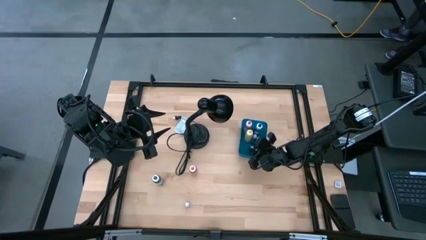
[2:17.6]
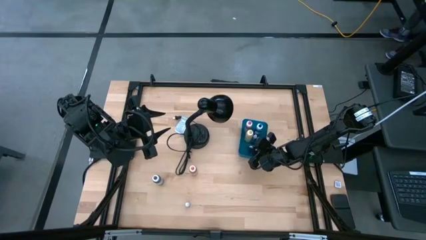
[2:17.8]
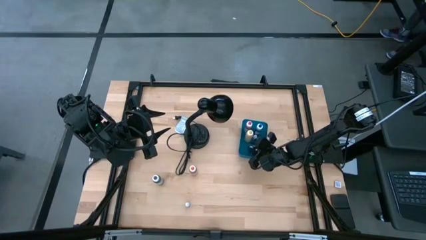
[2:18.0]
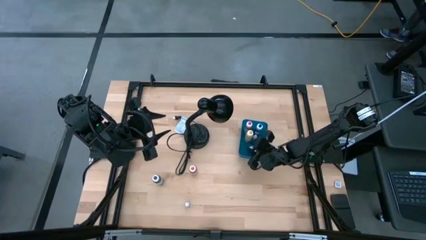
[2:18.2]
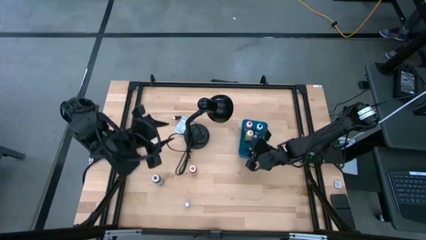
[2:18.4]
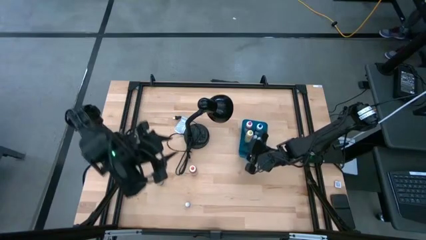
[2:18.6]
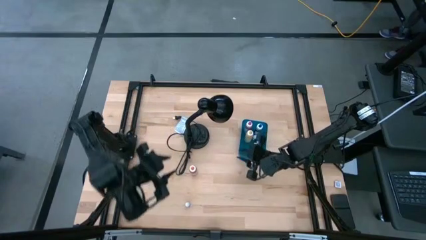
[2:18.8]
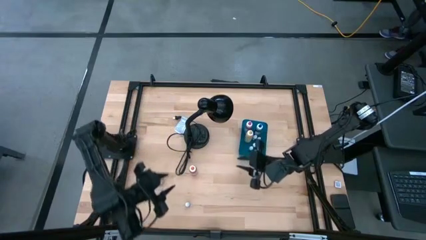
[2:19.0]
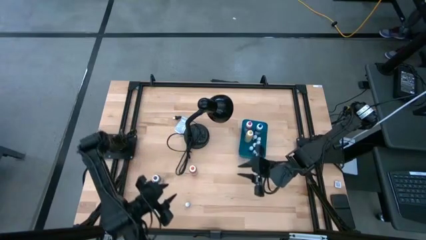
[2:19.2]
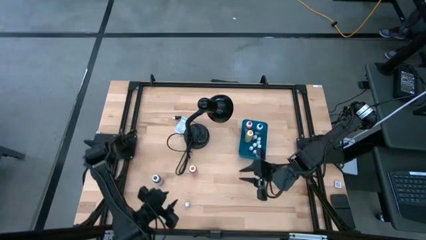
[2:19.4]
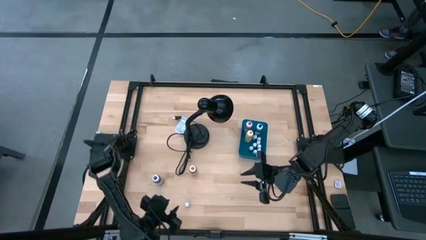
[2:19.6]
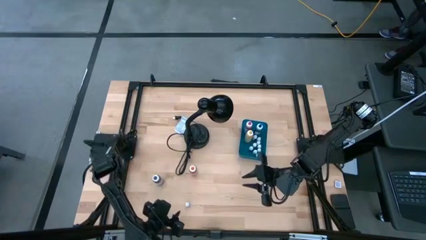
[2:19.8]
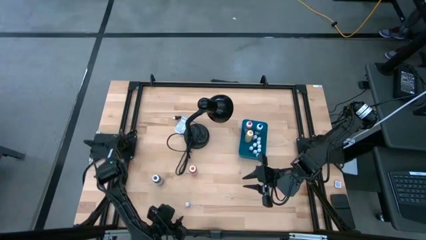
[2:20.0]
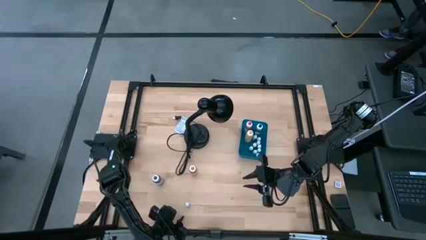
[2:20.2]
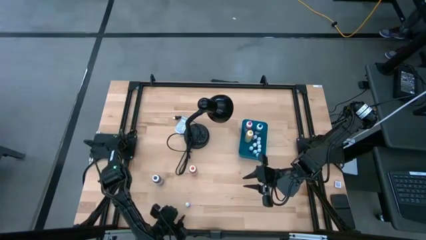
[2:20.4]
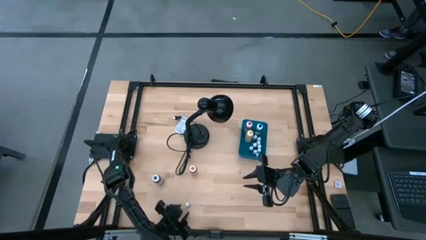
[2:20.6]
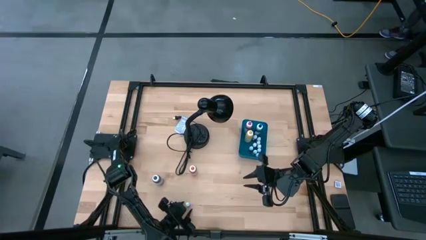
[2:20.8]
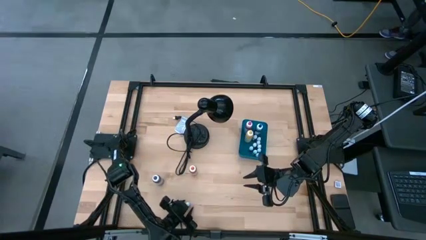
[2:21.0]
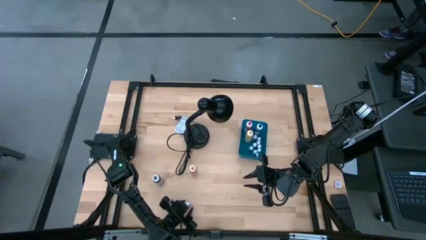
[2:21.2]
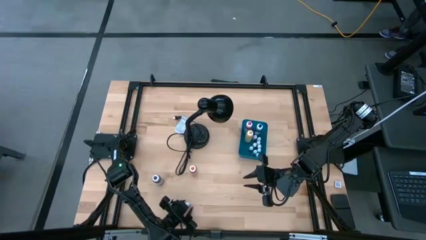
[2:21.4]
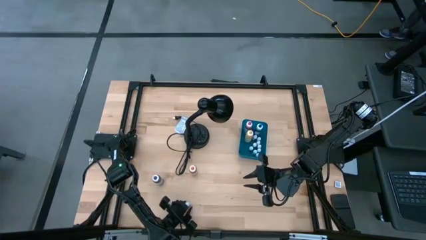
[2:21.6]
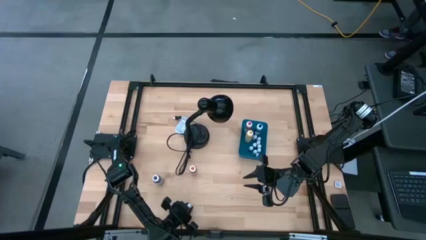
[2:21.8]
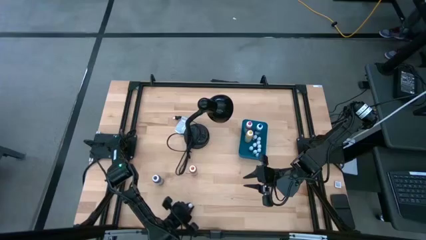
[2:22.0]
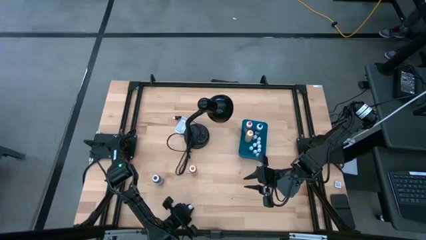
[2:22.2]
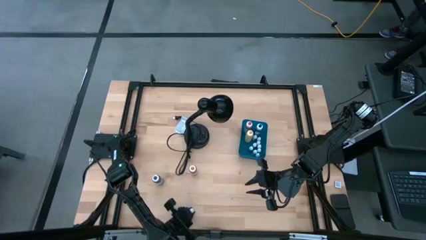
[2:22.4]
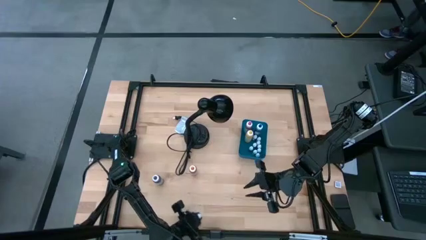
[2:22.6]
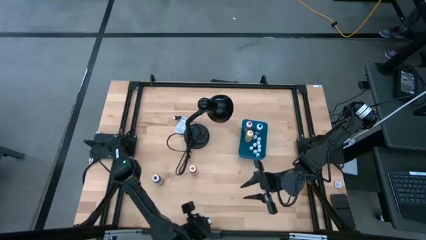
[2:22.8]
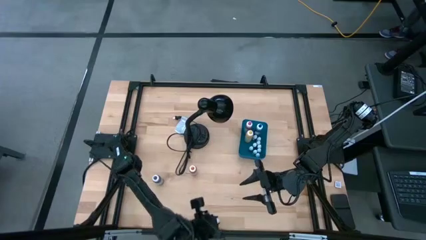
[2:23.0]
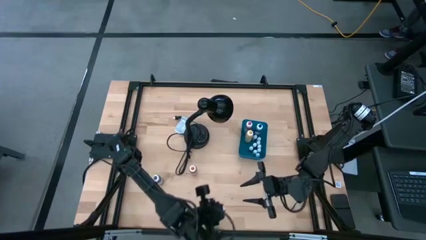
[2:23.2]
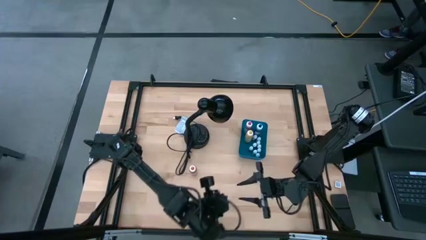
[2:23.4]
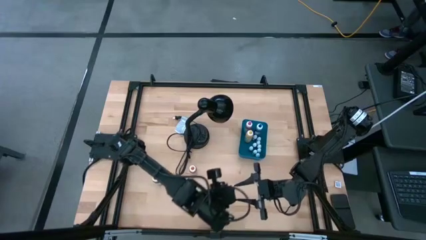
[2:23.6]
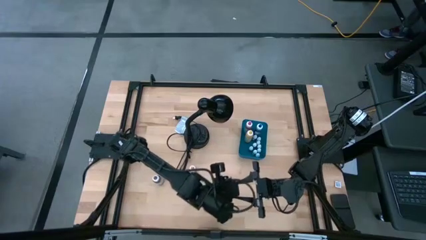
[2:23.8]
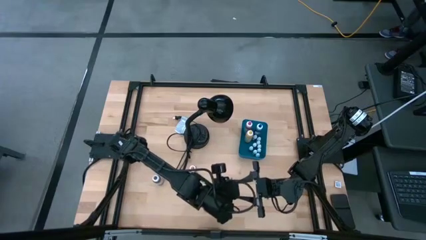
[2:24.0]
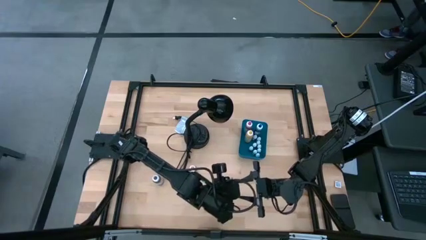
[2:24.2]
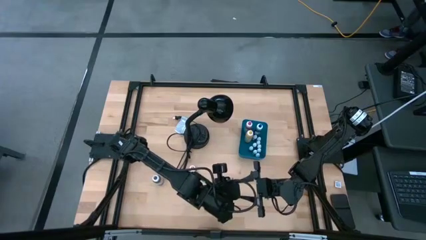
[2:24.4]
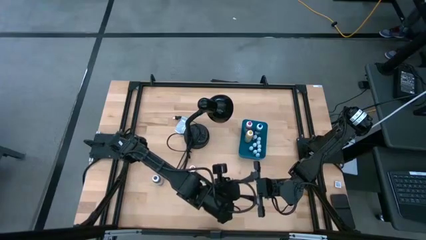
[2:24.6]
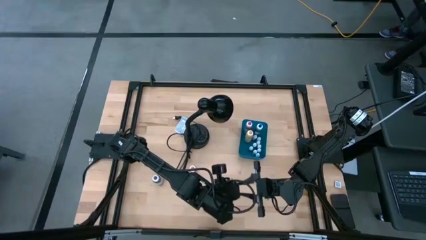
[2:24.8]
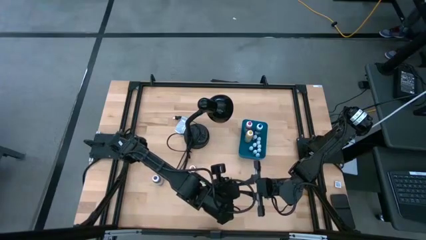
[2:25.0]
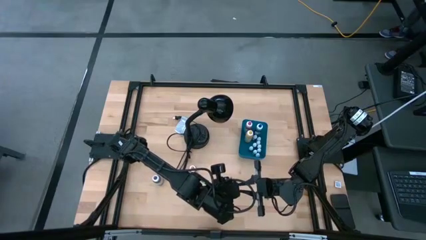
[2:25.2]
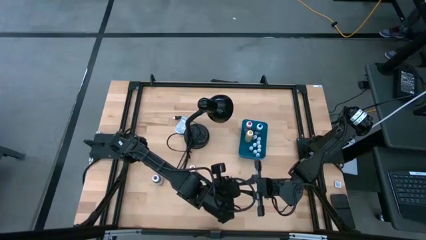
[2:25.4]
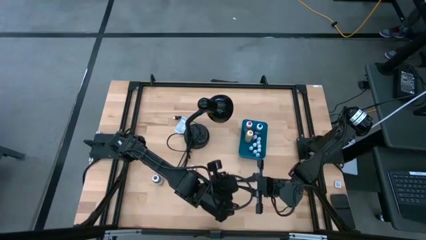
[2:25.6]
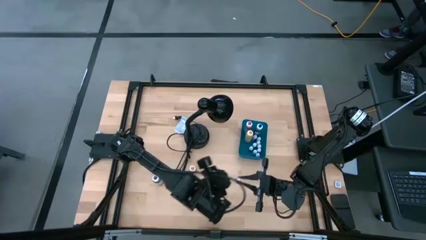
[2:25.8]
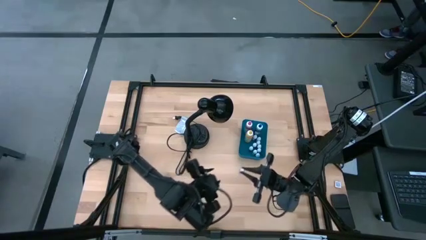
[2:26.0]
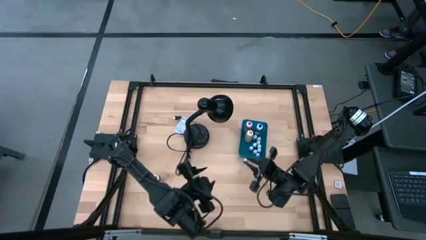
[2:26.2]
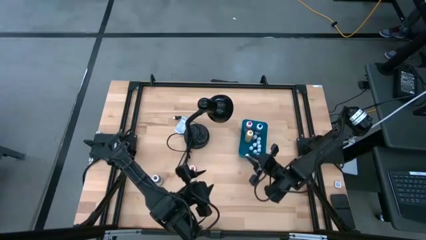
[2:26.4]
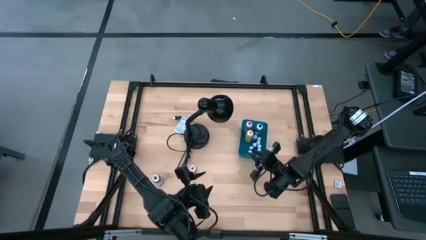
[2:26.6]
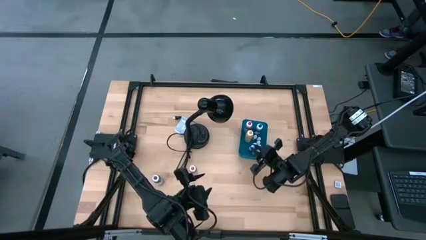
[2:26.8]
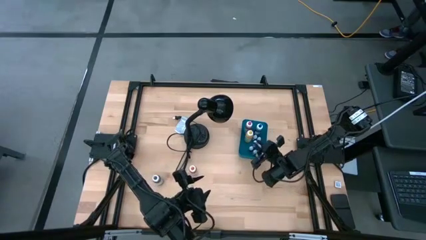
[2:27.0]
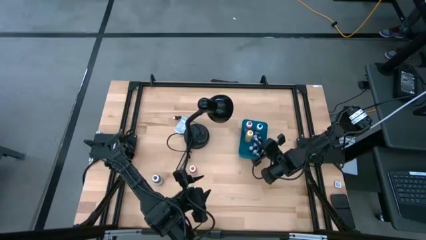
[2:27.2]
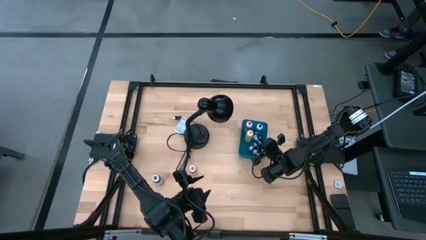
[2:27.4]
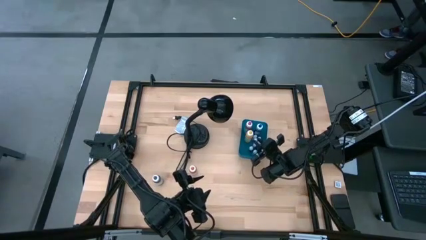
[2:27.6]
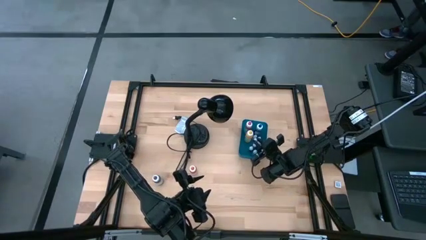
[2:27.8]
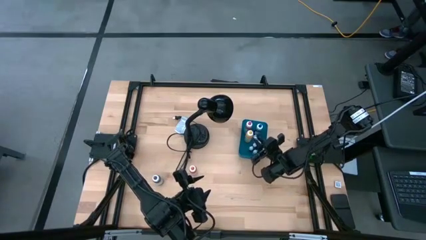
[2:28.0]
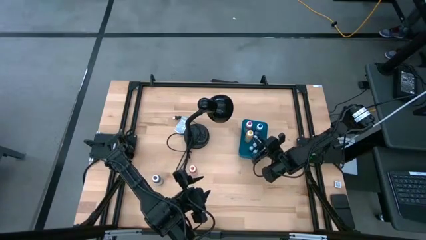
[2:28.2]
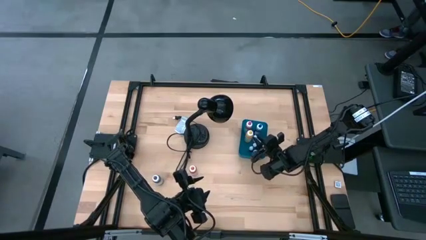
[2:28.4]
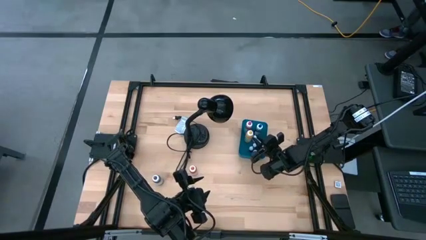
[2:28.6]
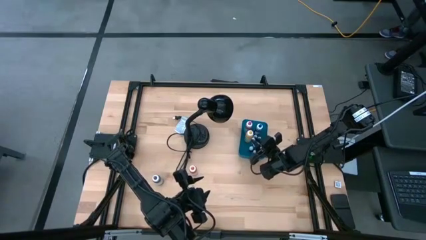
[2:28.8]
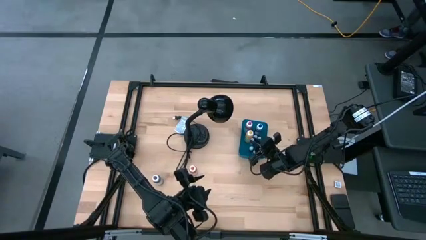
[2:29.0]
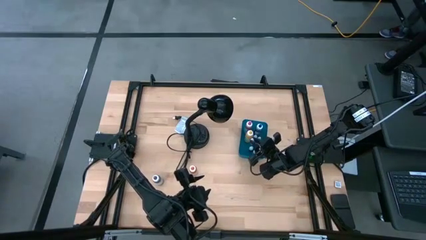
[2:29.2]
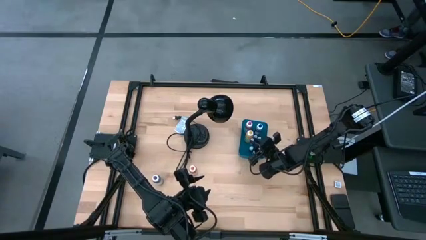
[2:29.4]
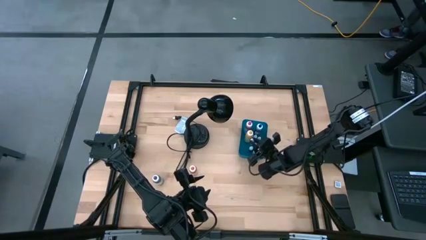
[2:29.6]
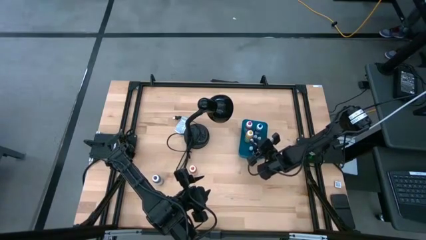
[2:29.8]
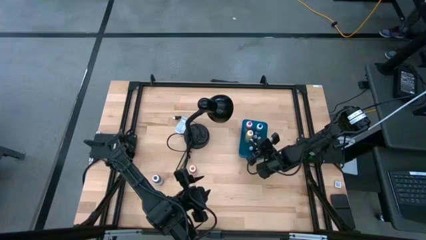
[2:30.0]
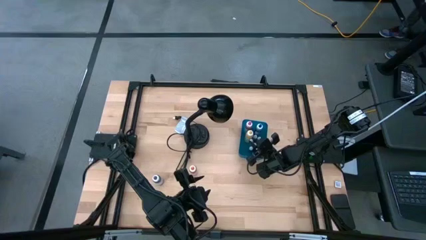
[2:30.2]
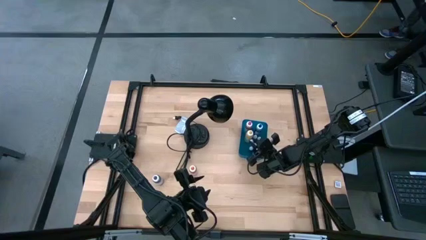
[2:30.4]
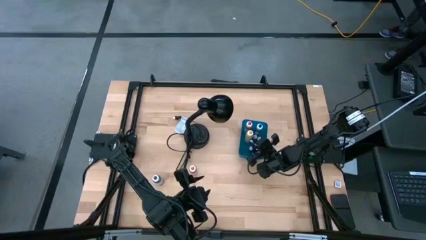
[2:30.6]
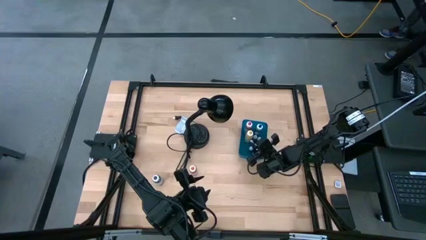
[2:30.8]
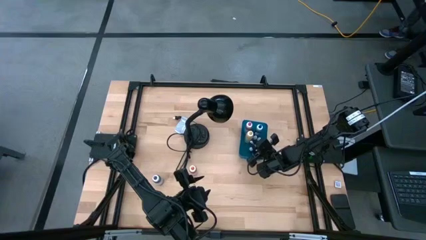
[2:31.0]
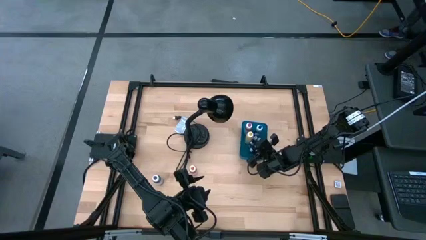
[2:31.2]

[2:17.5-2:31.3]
Task: Pick & Place food coloring
Put the small pink food coloring bottle into the blue bin
